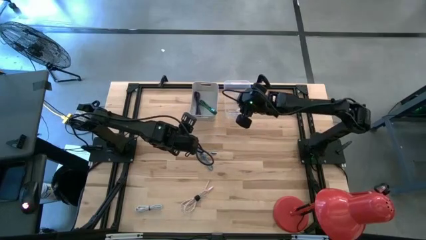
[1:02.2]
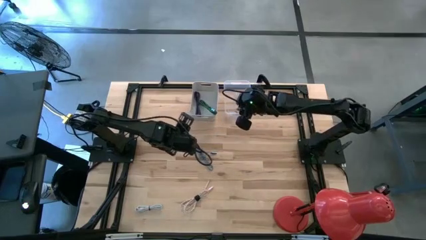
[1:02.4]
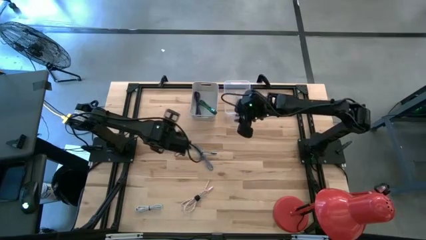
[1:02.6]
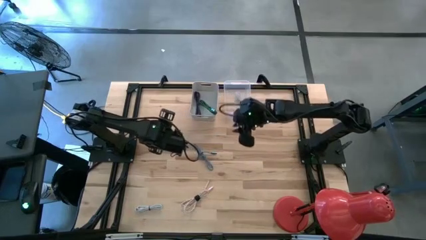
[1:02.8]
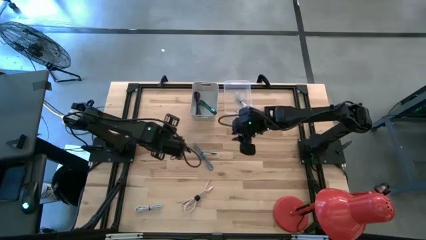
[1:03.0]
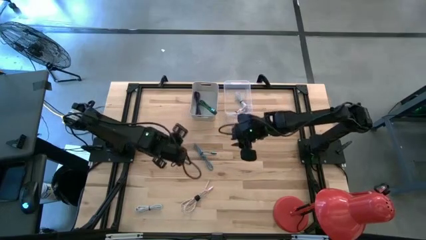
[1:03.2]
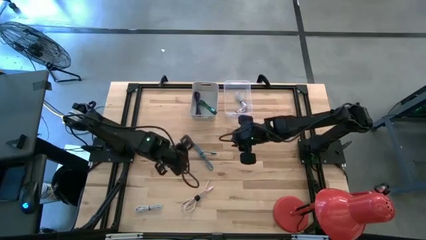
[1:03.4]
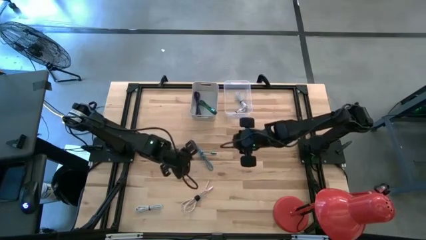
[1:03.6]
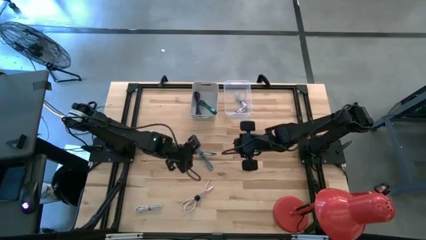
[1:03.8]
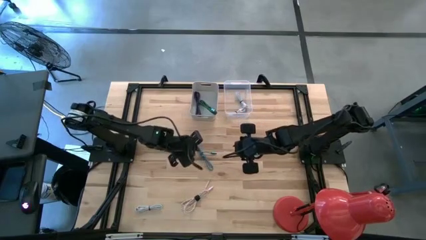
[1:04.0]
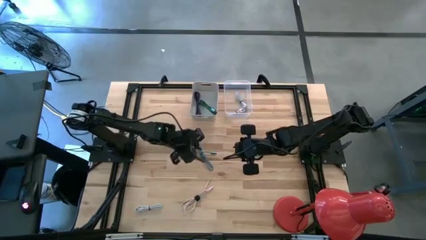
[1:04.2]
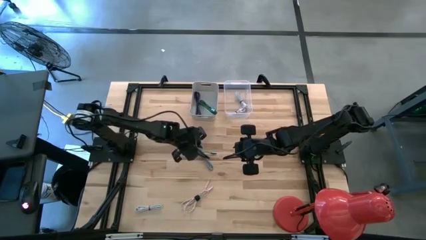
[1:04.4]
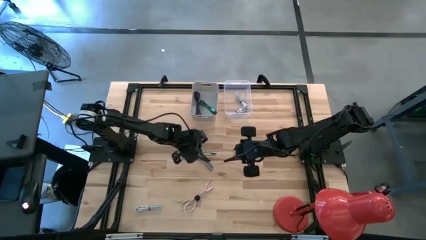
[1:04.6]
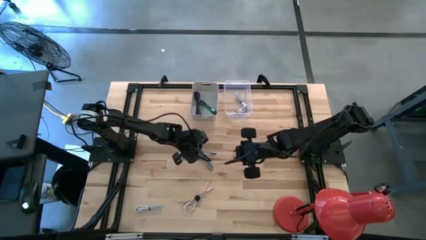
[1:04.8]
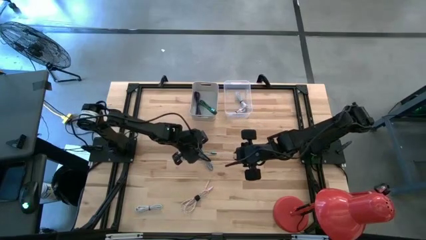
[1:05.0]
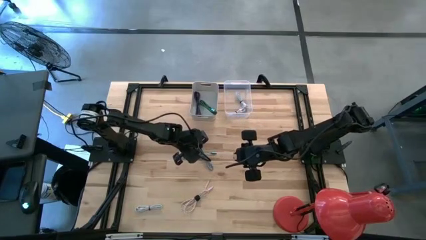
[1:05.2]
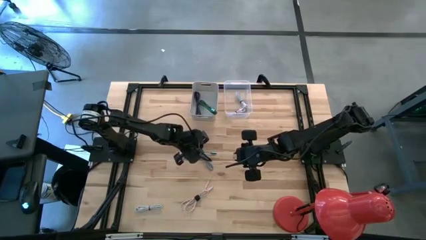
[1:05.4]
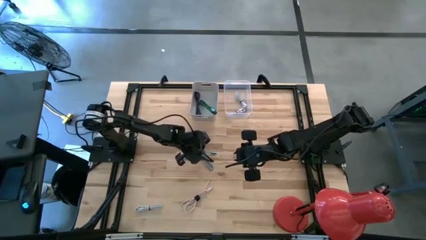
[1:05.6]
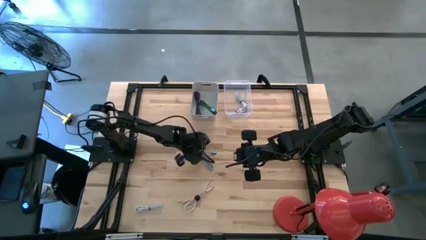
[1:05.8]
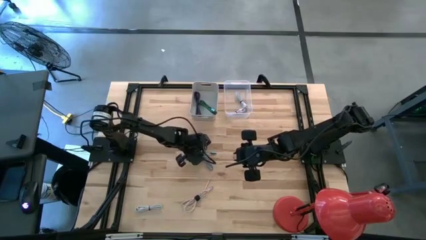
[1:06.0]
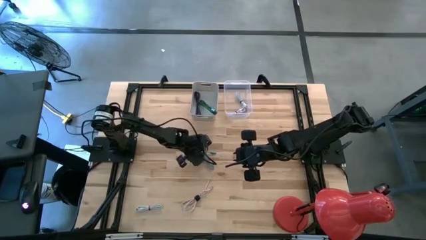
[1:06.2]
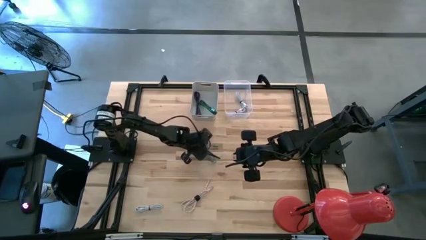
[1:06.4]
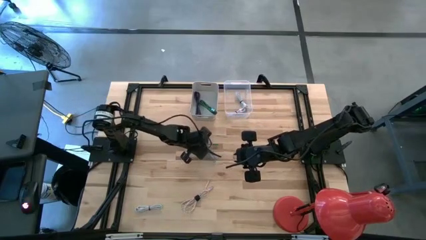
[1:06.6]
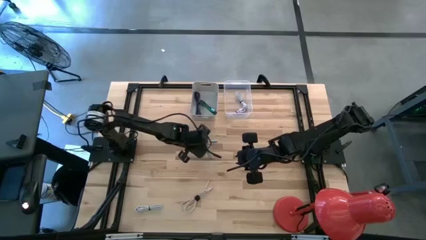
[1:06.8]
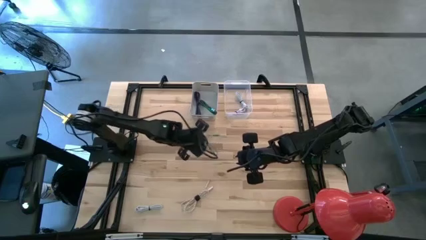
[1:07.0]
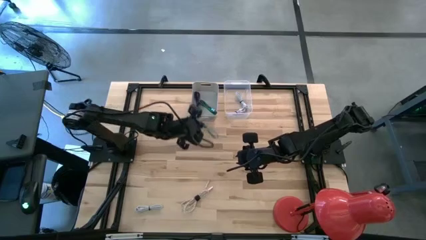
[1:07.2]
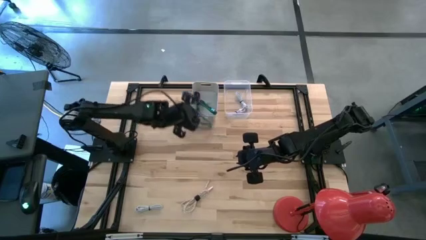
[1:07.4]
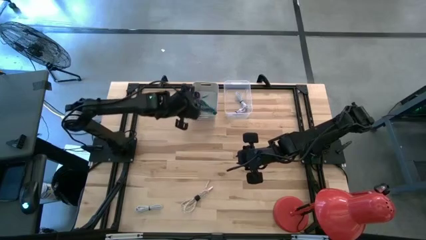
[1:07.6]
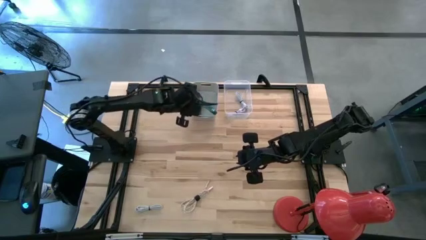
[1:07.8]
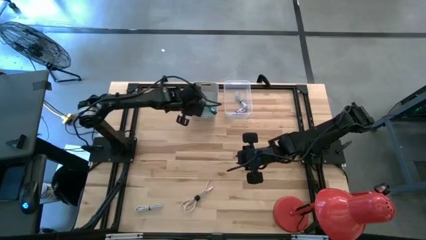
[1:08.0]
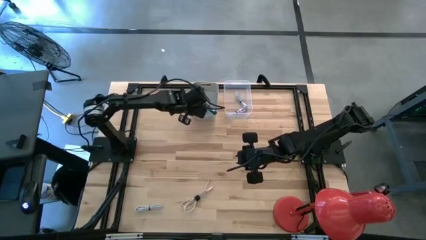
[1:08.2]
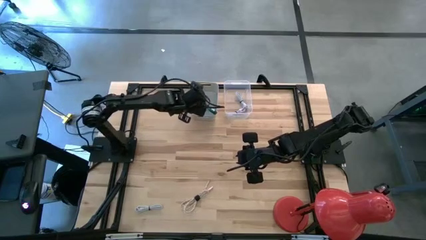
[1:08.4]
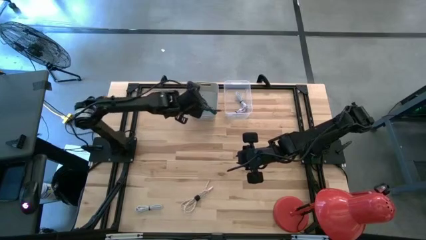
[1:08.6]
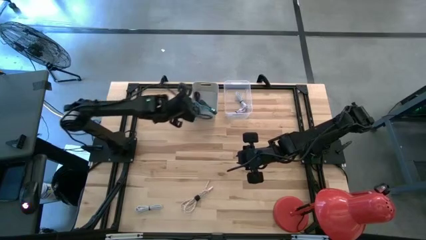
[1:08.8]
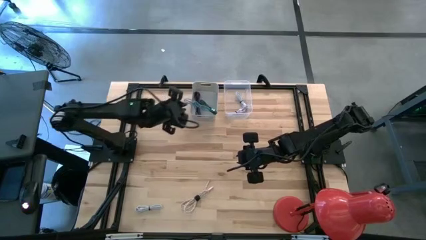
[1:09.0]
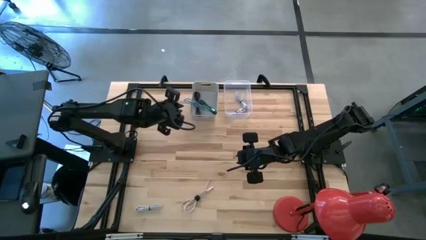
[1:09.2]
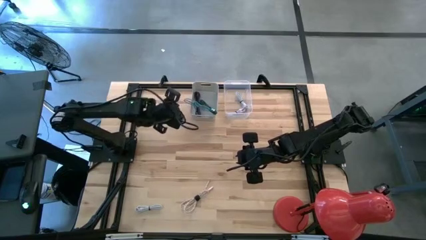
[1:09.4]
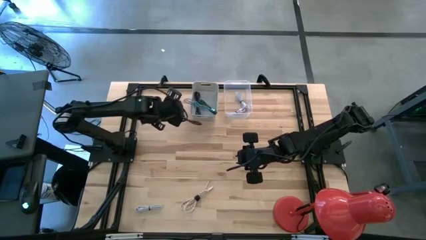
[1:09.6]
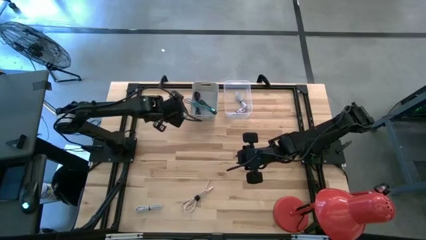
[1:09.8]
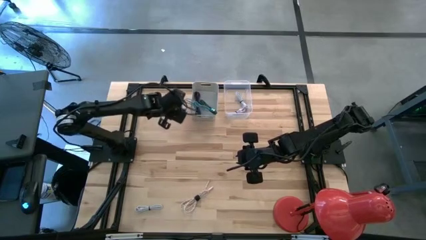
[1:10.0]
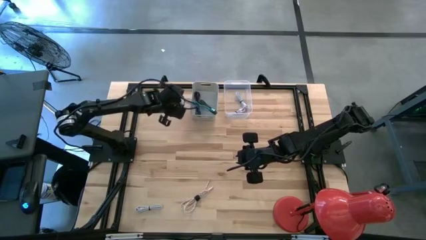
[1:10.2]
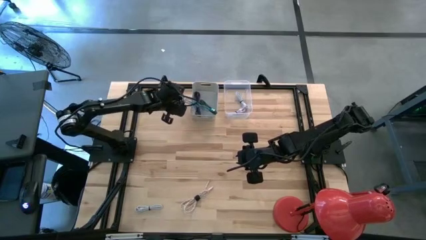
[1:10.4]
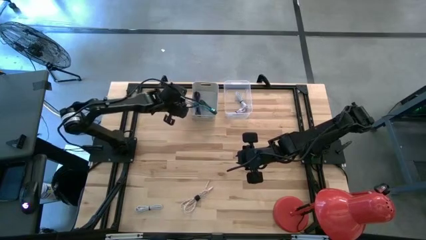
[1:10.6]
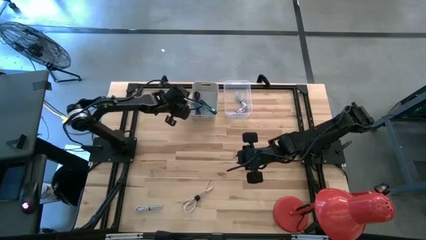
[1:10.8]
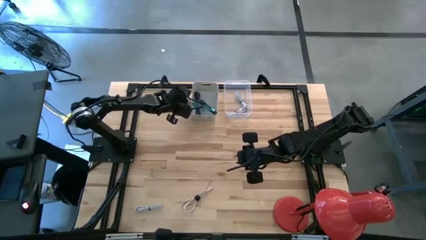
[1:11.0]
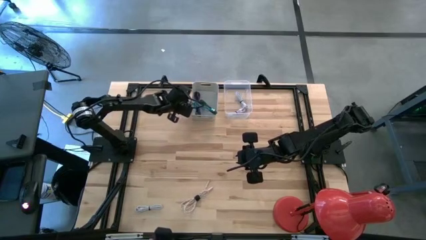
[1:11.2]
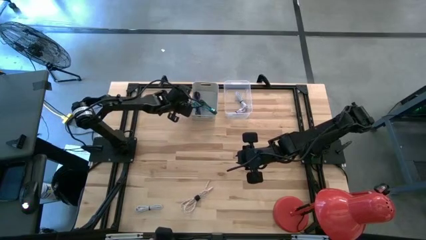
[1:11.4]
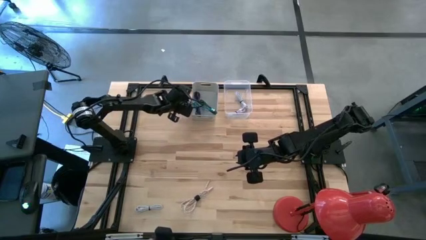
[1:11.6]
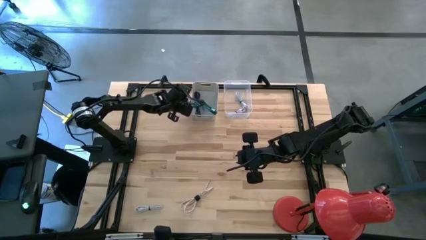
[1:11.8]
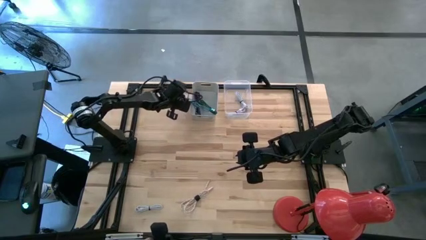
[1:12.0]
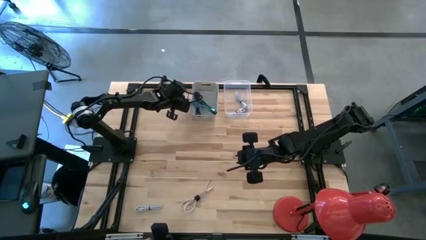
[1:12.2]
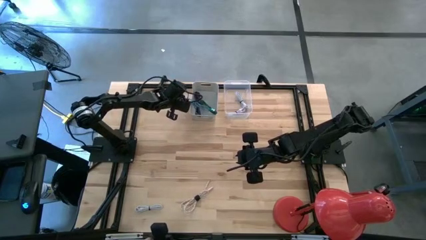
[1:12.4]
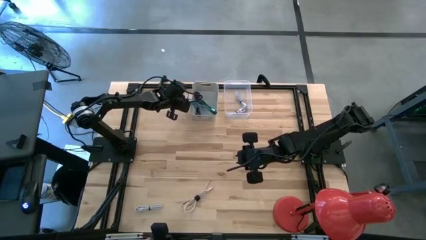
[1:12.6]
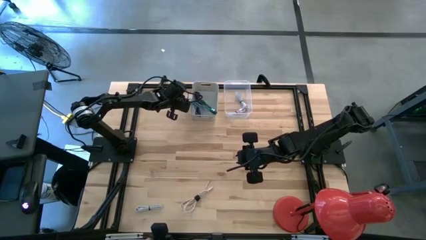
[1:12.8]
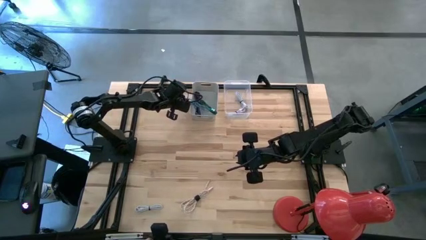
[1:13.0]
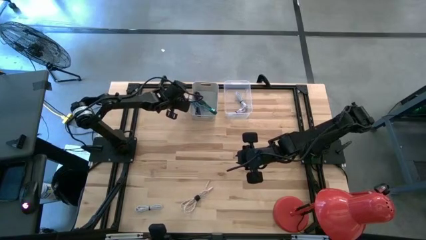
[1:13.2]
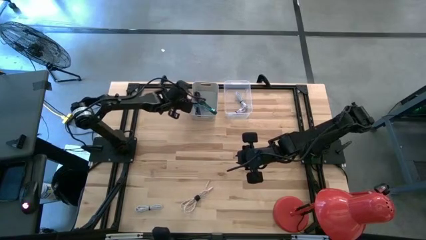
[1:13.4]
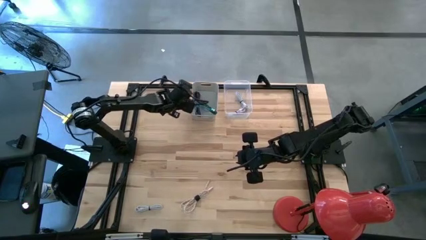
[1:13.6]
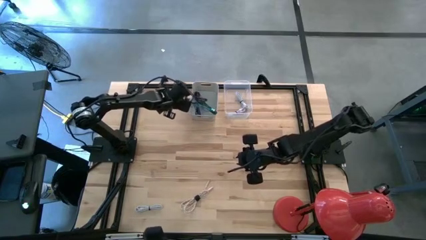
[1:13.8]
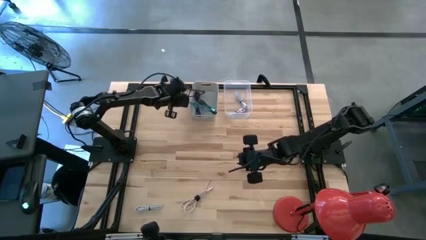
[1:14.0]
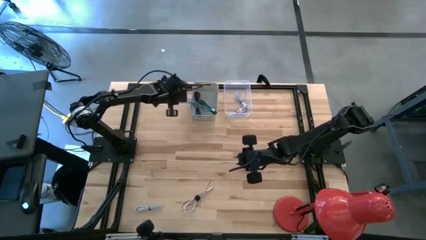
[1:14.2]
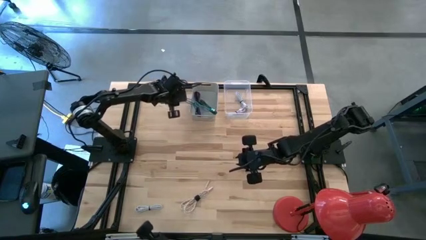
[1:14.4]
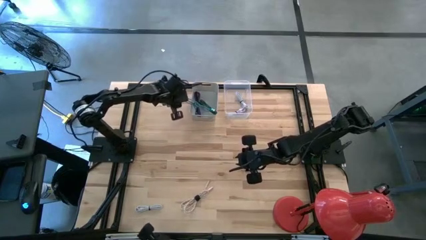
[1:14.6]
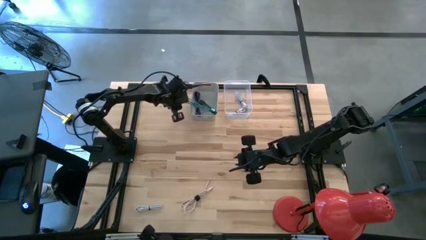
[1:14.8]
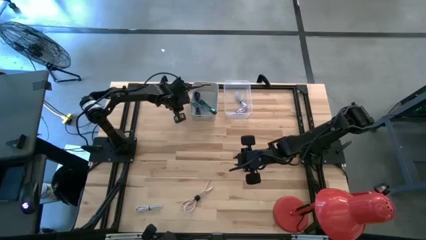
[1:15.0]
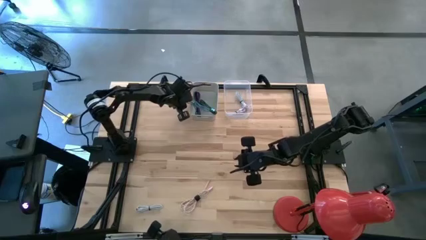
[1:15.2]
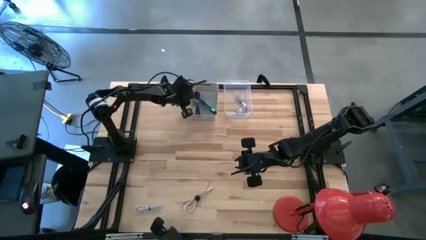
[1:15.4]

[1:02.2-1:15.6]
Task: Pick & Place USB Port
Put the blue and black charger cable into the gray bin
